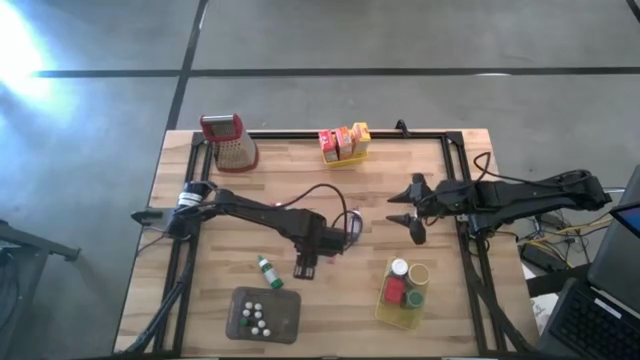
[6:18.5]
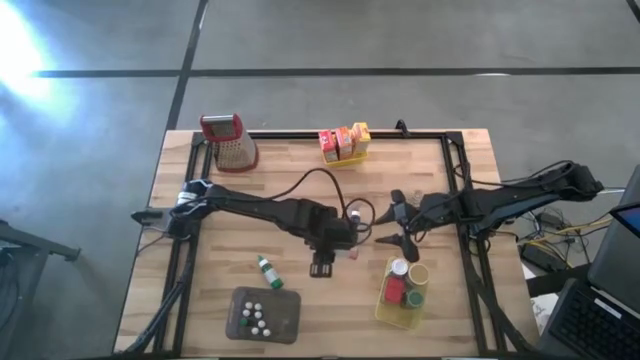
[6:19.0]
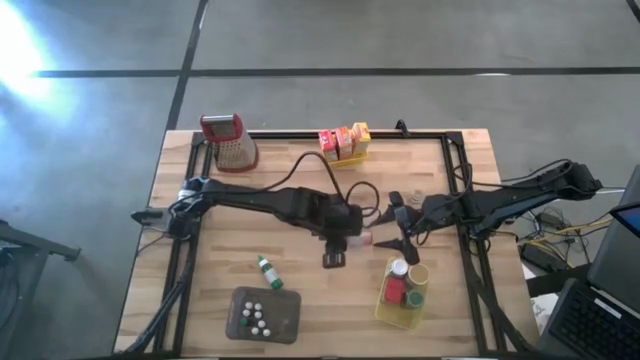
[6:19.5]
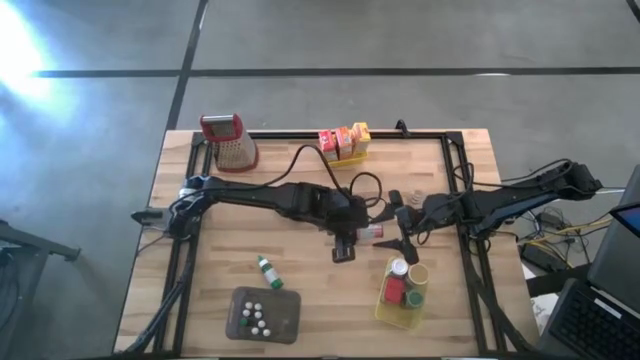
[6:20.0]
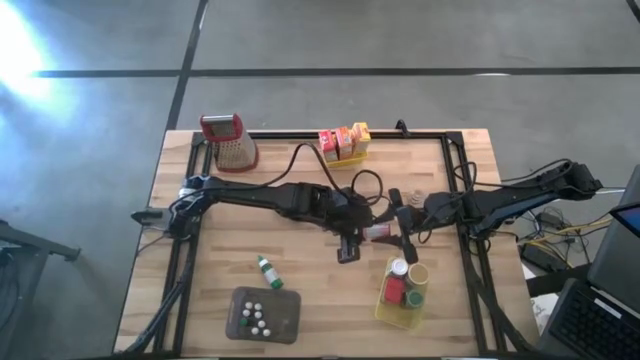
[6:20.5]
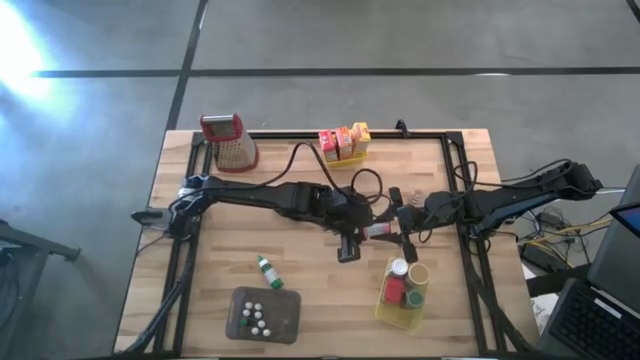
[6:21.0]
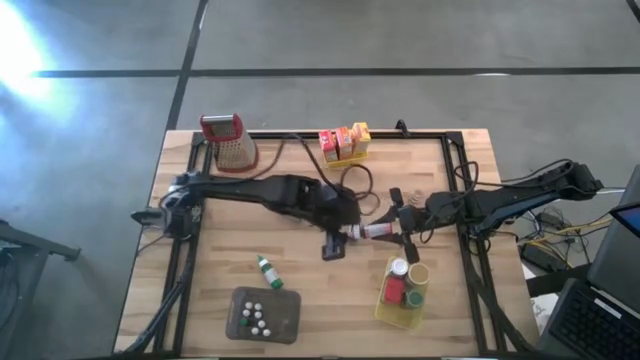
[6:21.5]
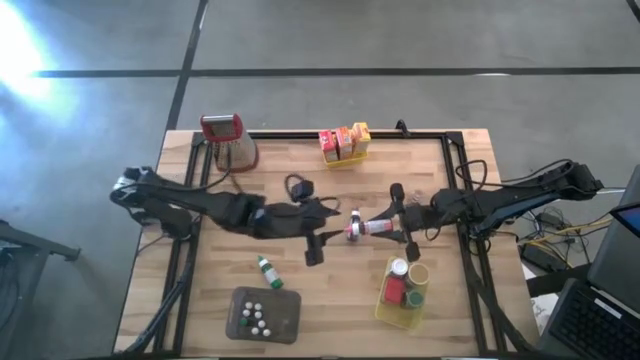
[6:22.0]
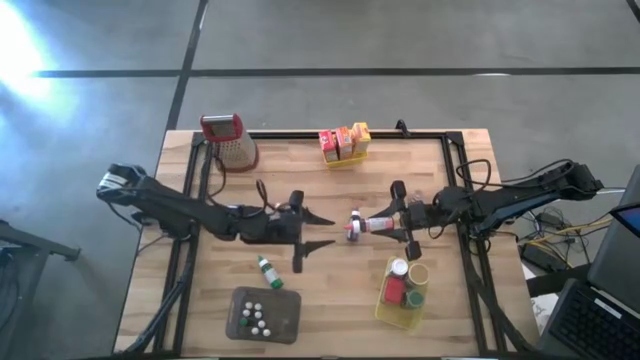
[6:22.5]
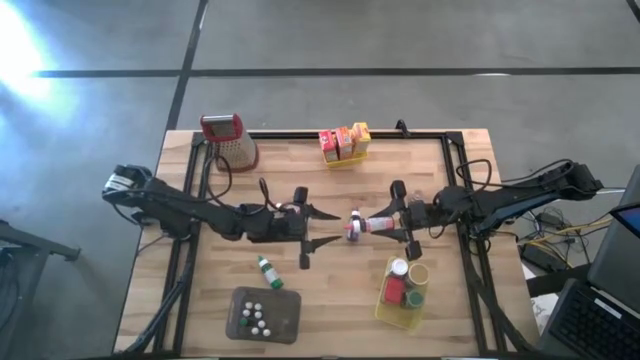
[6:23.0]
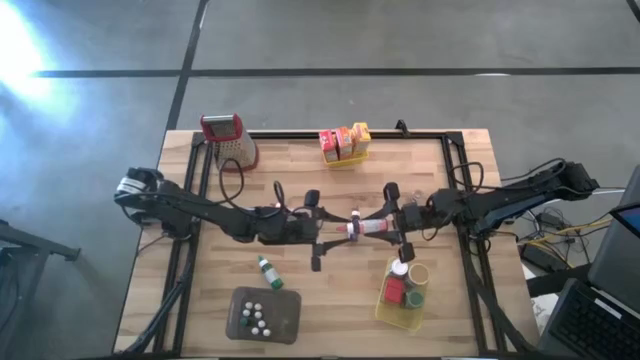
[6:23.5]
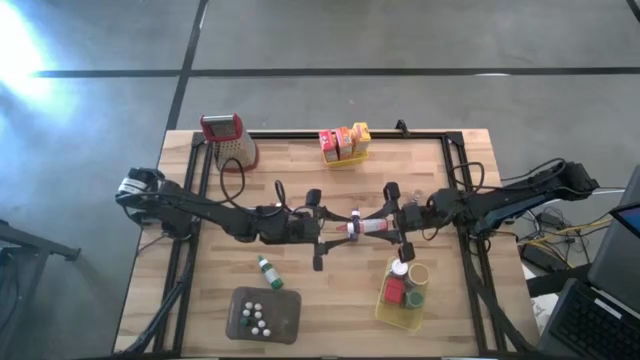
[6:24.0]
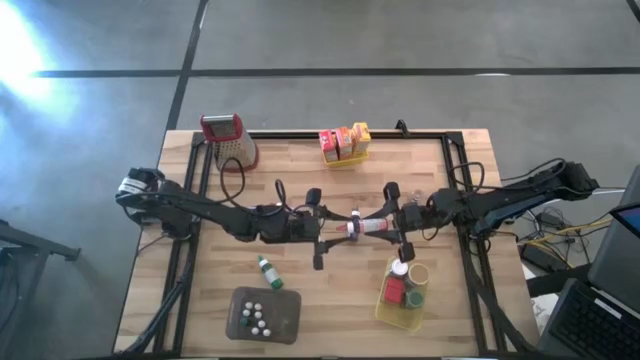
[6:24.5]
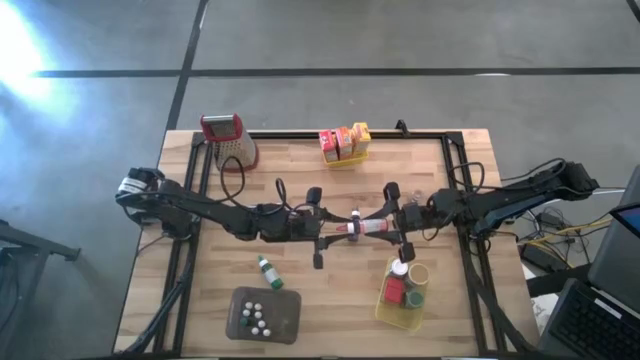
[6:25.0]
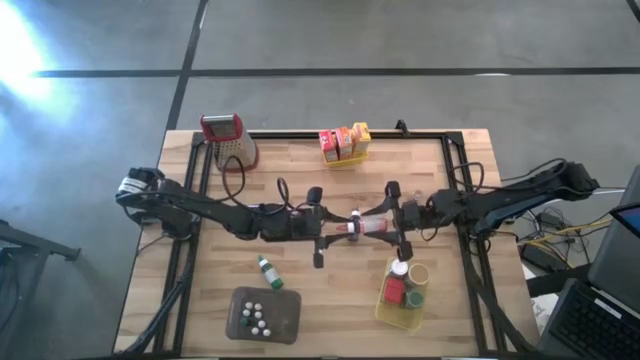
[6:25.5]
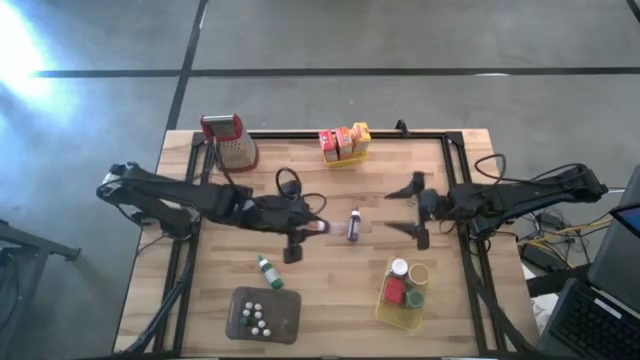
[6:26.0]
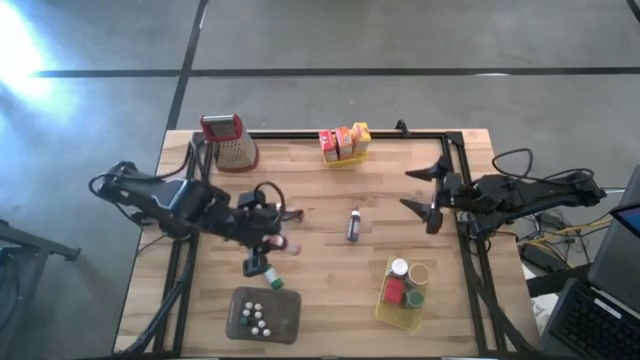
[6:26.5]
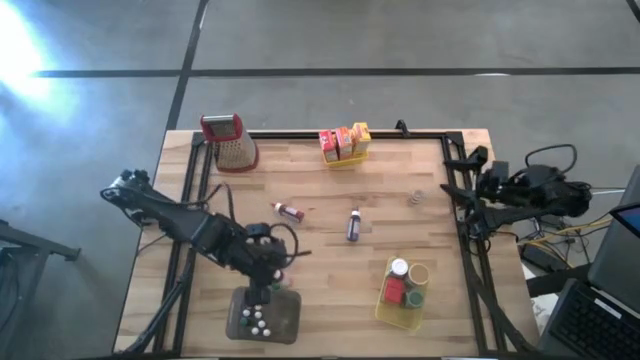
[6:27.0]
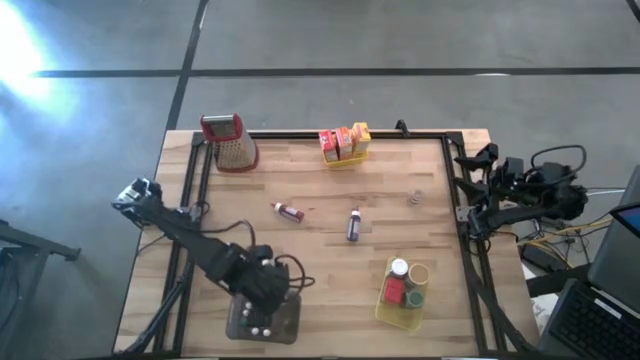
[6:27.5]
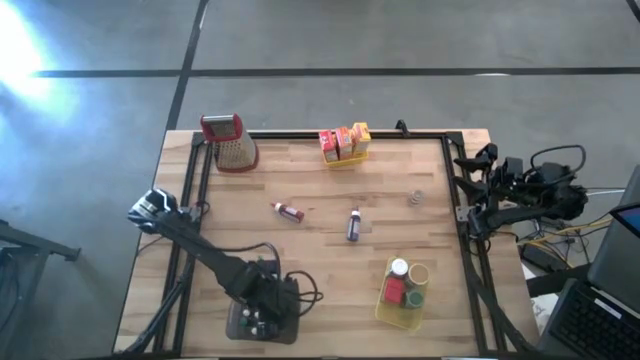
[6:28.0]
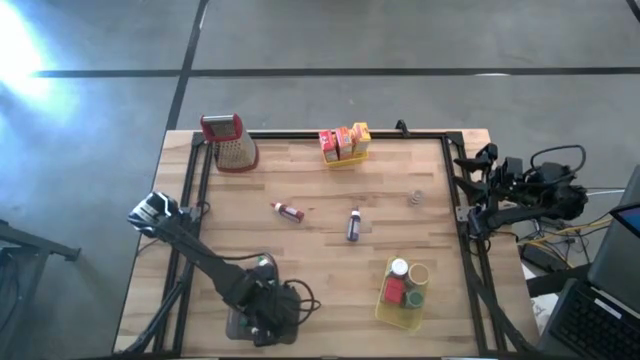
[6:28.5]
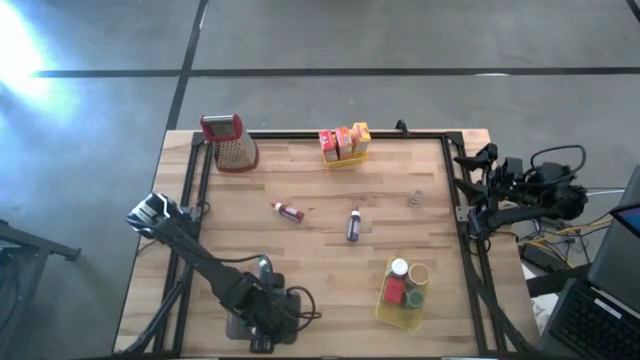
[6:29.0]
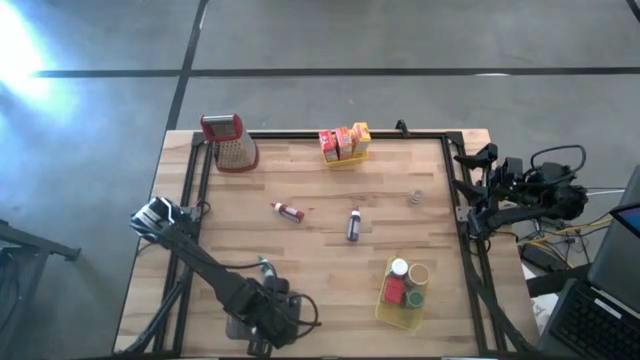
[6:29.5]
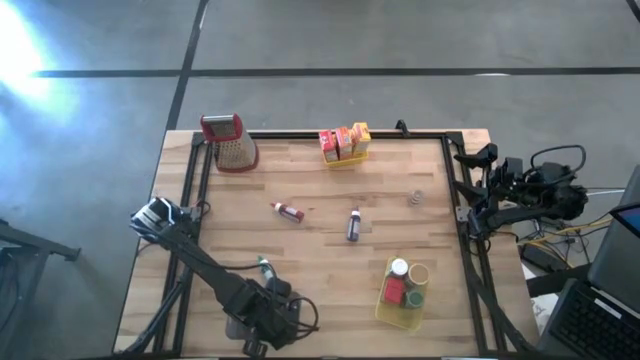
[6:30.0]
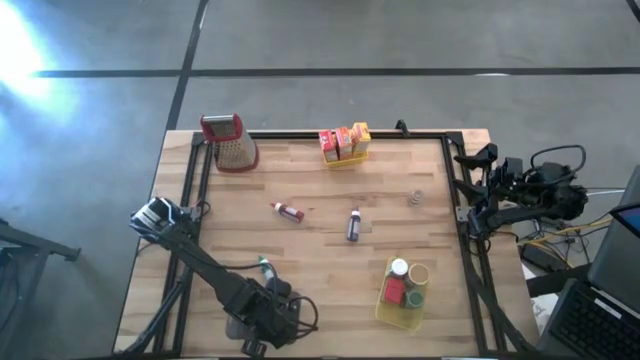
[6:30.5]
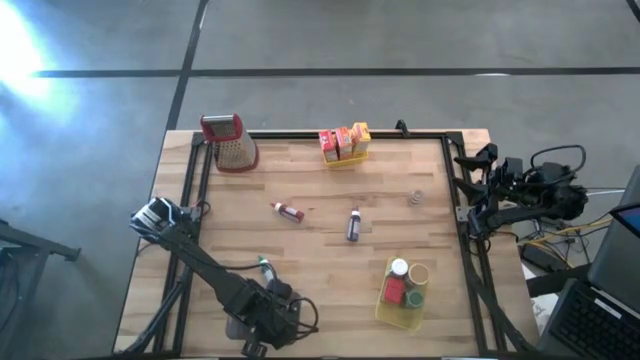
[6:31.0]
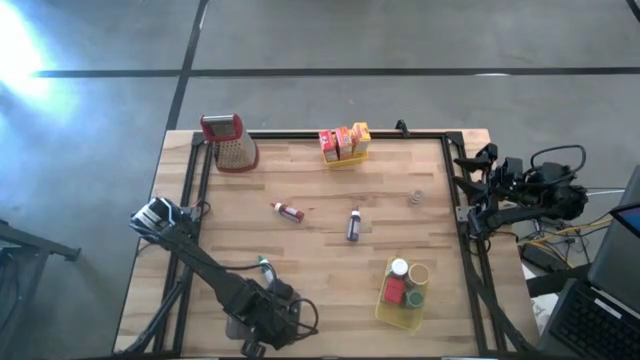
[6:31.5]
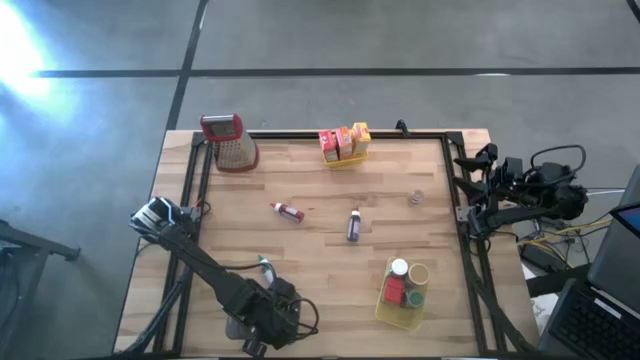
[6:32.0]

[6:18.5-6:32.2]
Task: Pick & Place Kitchen Items
Put the large pink food coloring bottle into the black bin

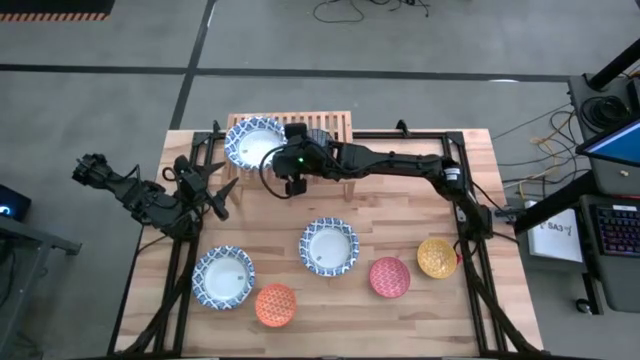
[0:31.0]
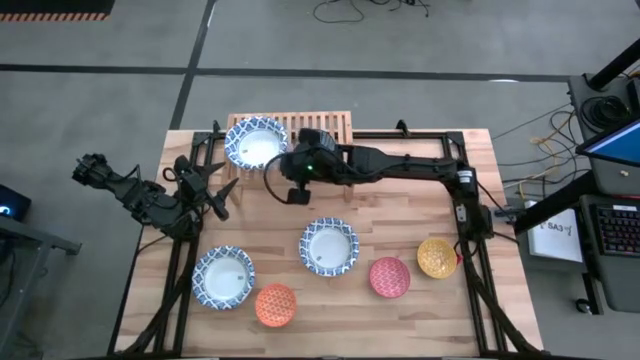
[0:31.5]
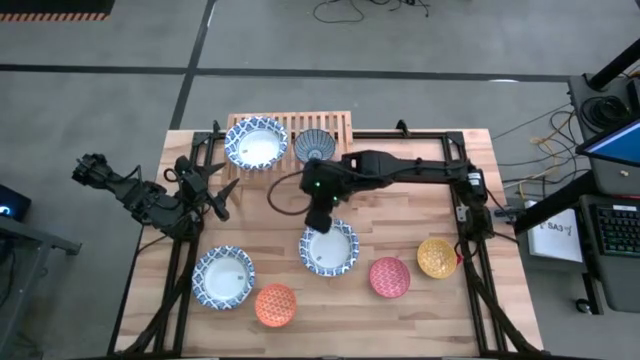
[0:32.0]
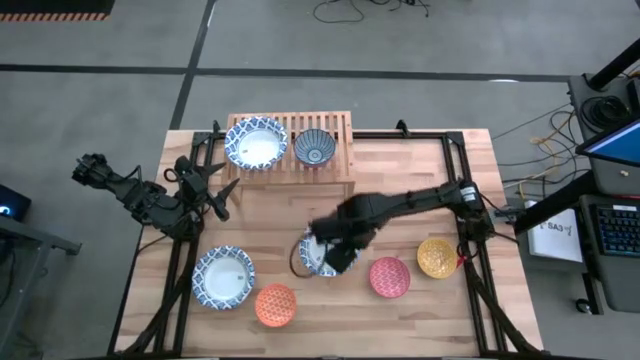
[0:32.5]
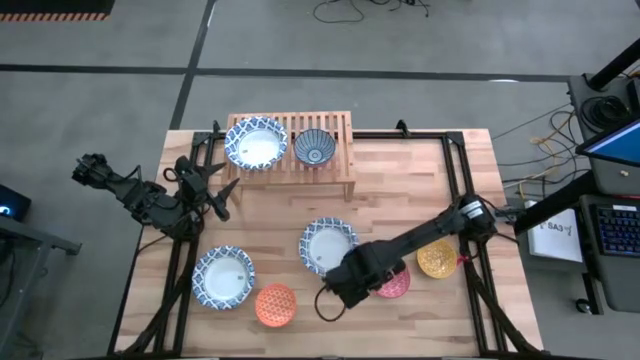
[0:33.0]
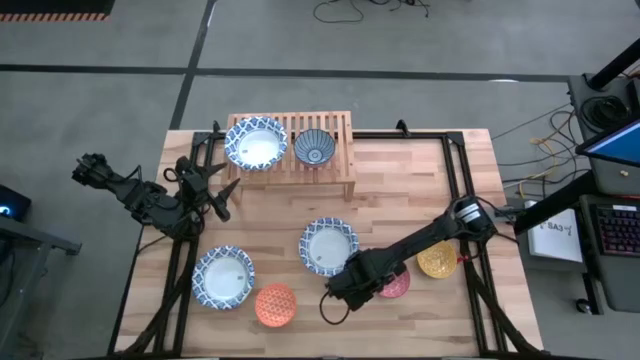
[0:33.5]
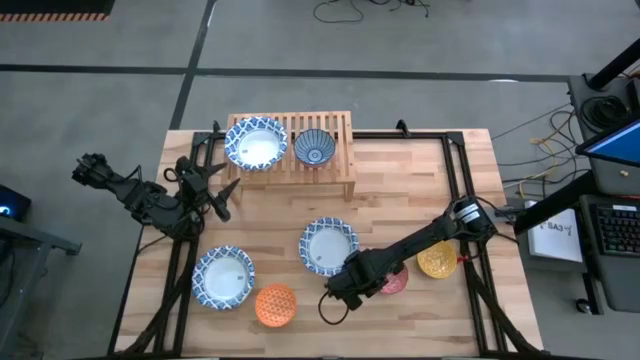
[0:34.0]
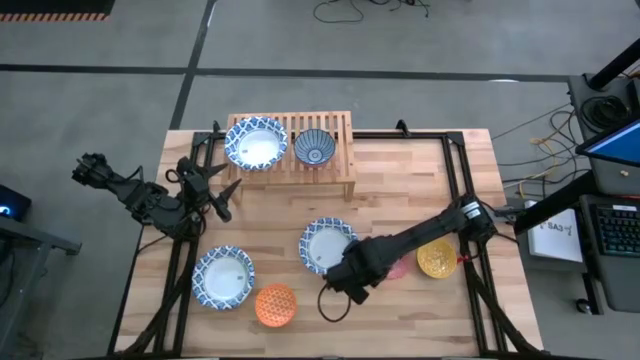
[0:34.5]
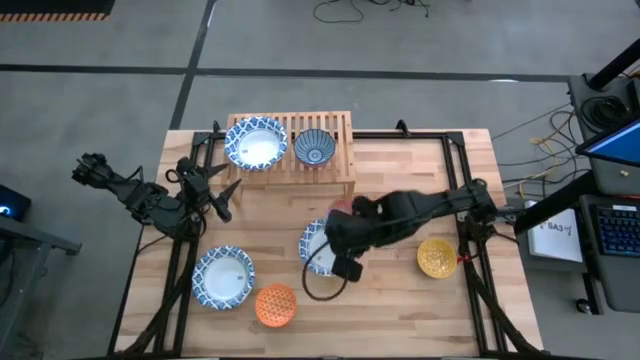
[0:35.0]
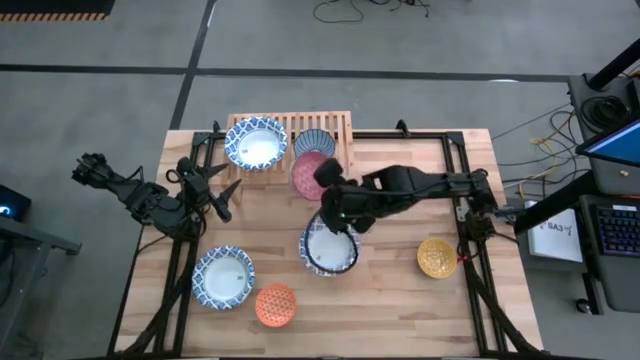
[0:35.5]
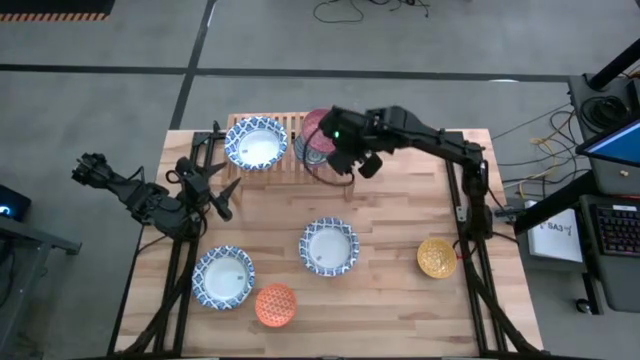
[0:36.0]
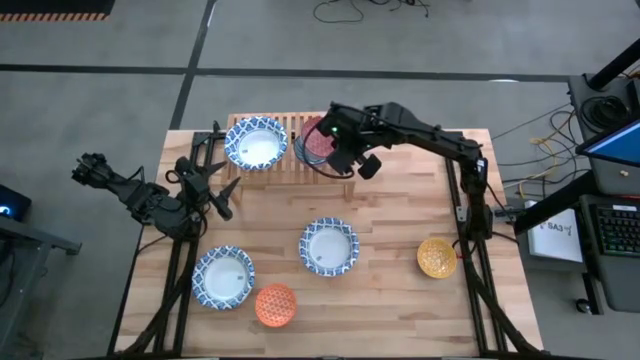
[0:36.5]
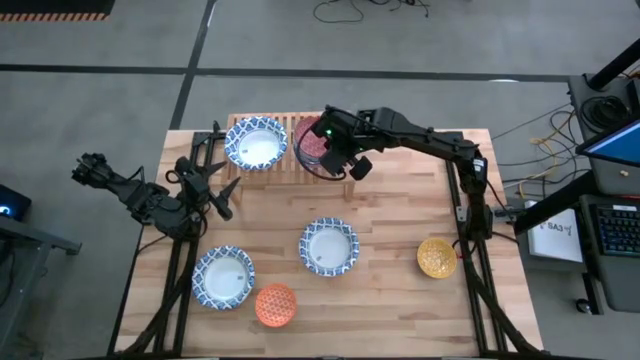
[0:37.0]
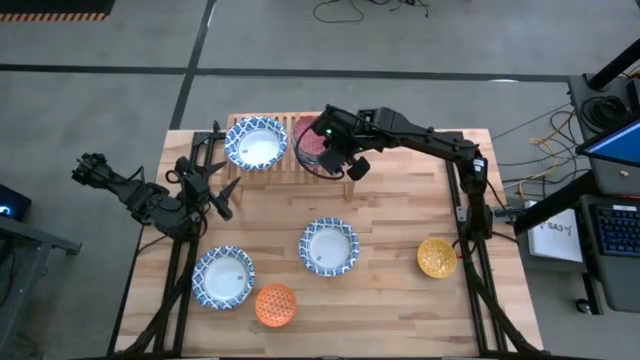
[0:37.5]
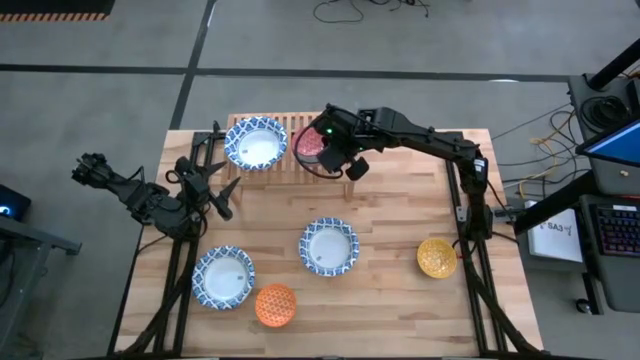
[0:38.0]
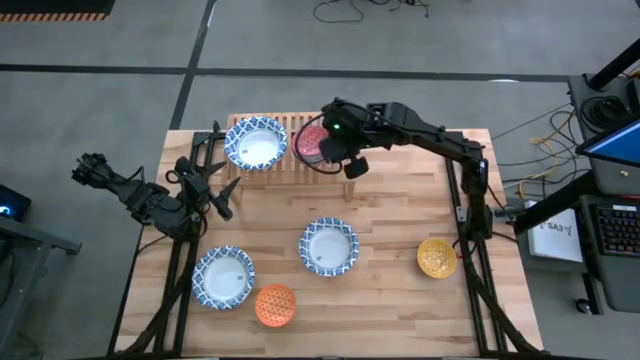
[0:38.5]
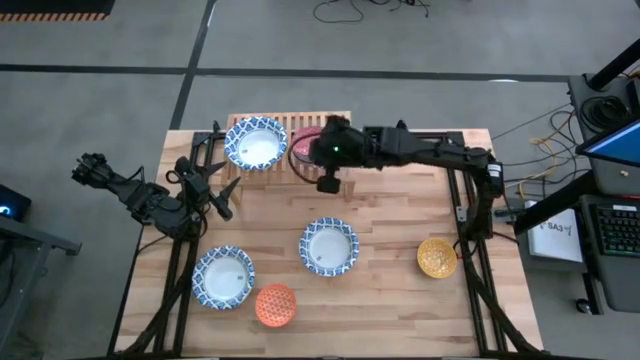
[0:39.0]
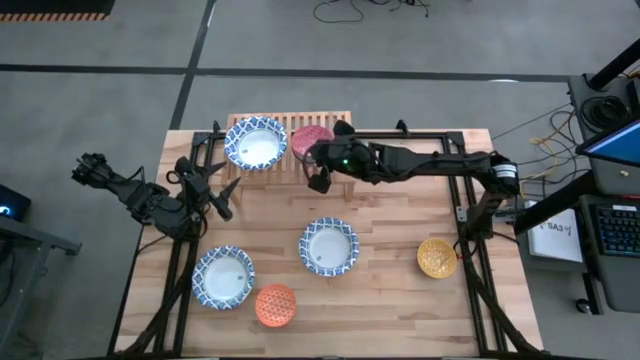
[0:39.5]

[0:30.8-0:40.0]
Task: Place and stack bowls onto a shelf
Stack the red pattern bowl on top of the blue pattern bowl on the shelf
